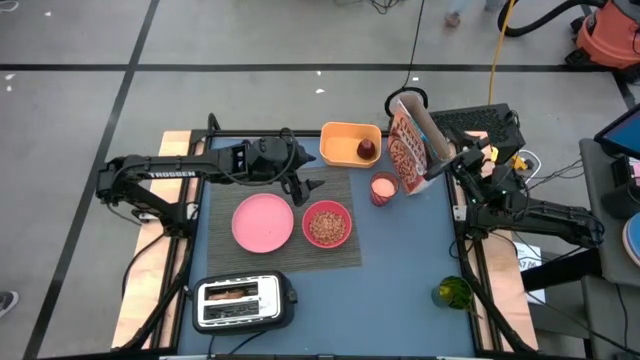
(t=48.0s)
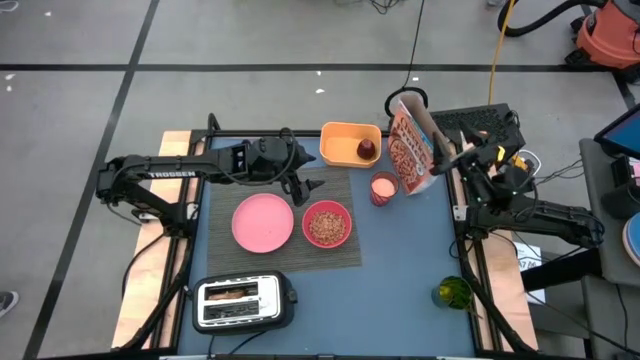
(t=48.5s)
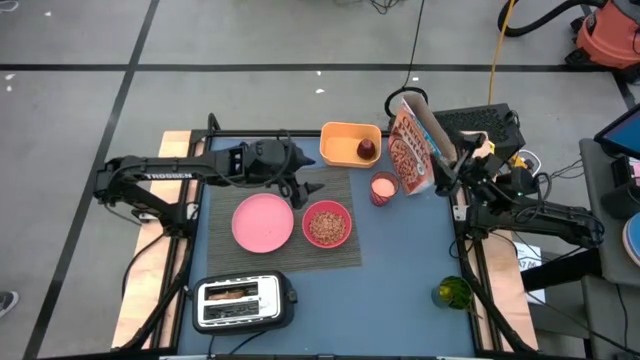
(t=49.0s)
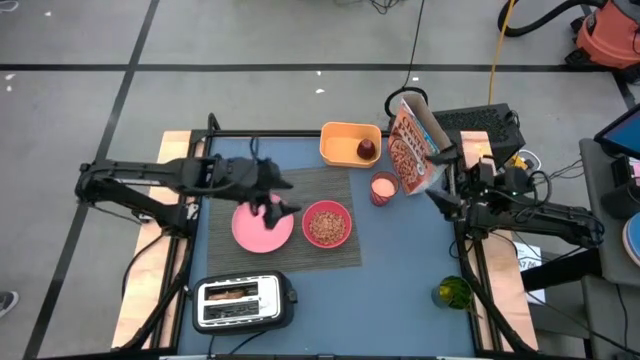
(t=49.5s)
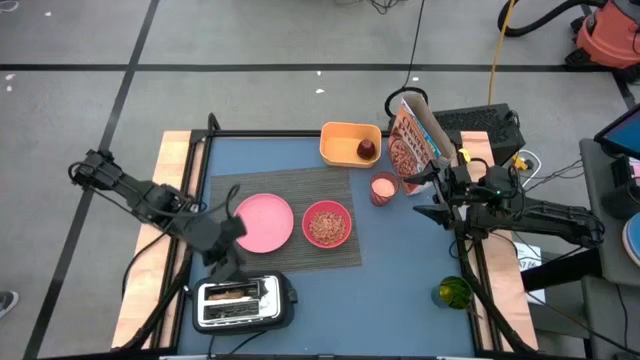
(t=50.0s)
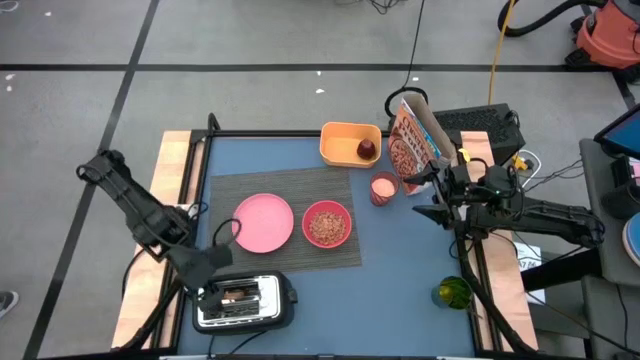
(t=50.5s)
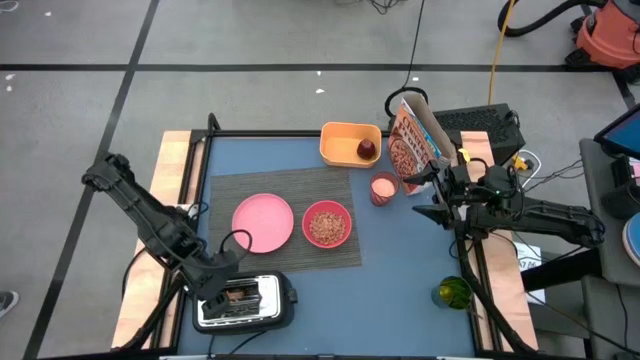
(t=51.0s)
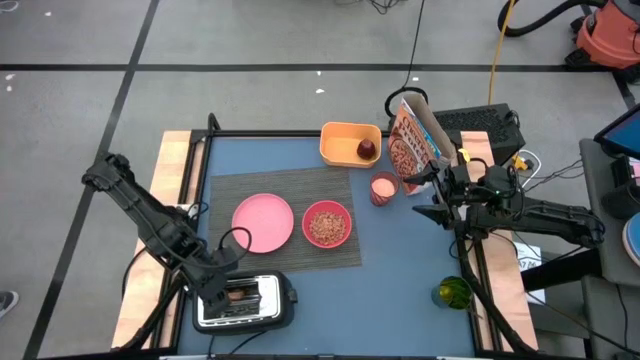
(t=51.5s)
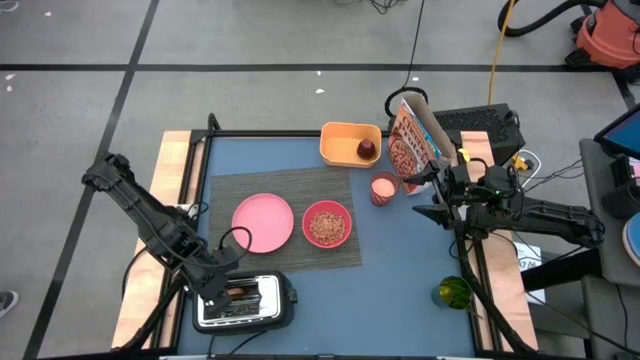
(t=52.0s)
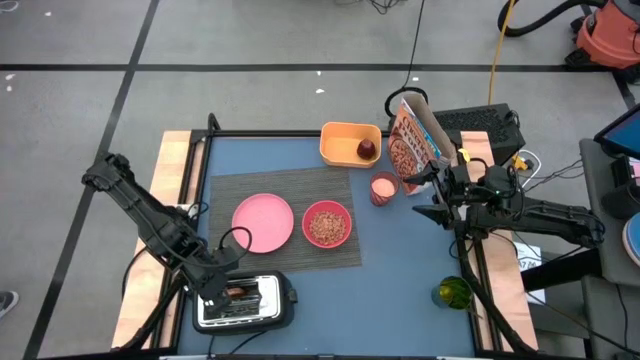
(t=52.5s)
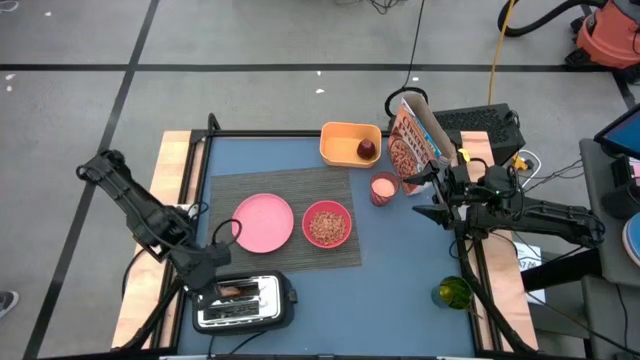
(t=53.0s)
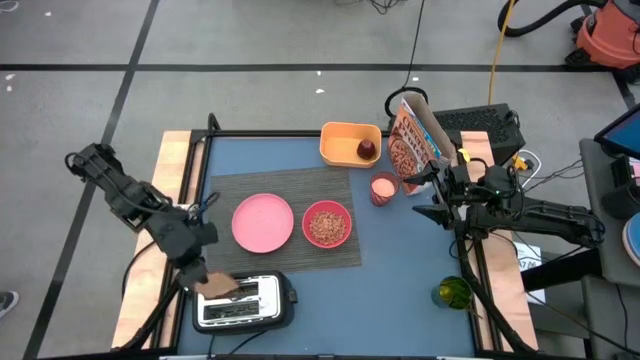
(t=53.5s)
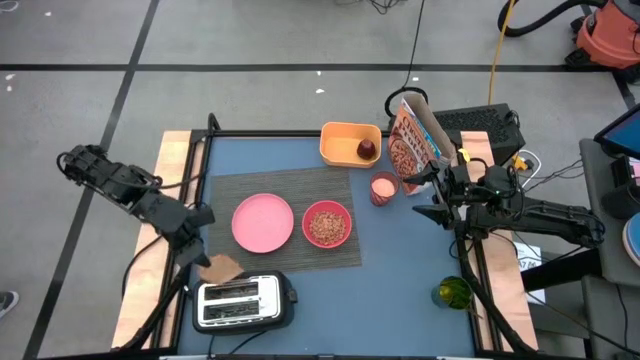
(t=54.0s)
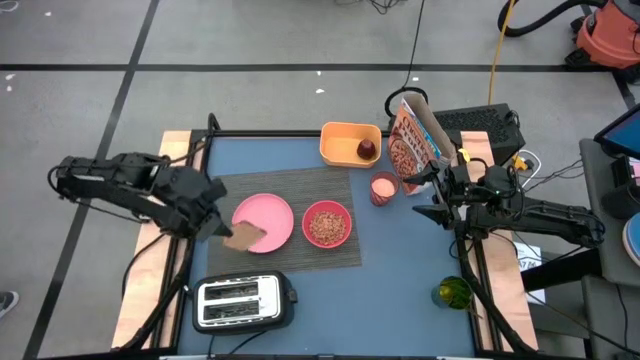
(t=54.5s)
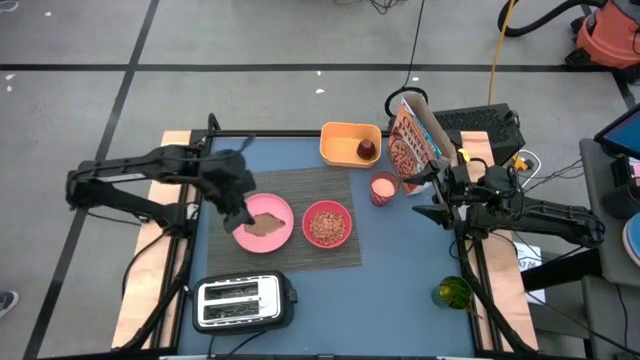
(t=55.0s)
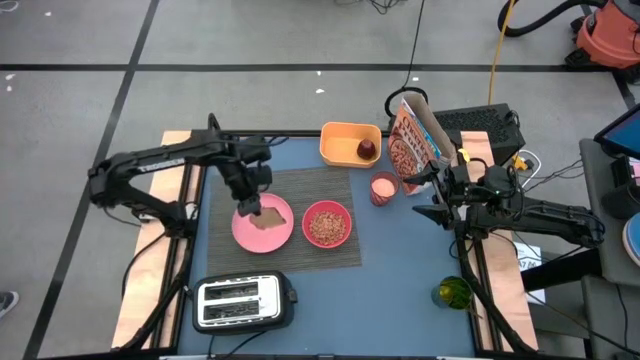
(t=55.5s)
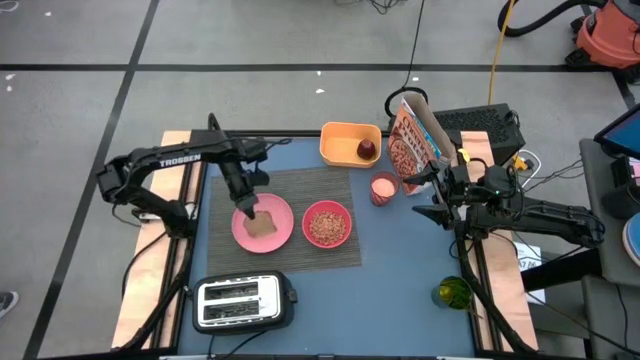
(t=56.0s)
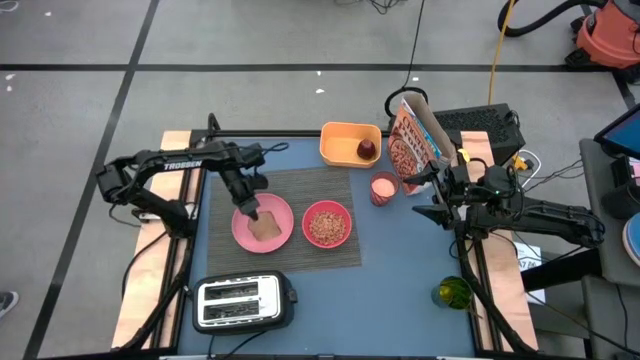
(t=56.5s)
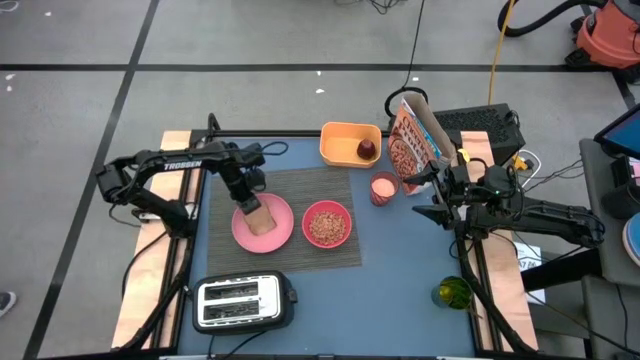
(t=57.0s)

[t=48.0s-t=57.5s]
Task: Arrange a breakfast setting
Put the bread on the pink plate

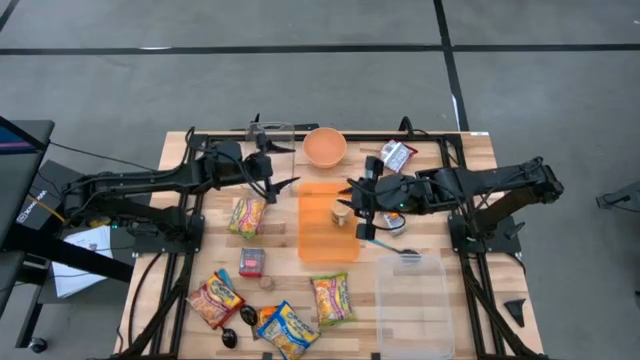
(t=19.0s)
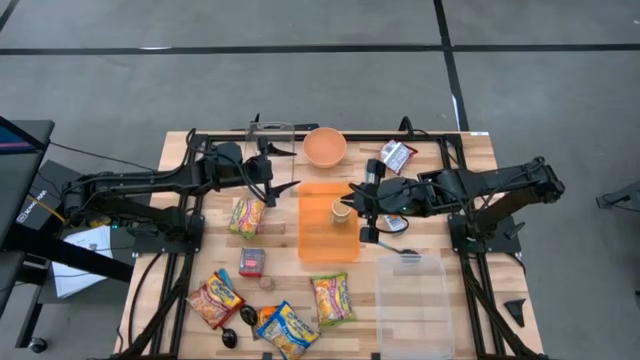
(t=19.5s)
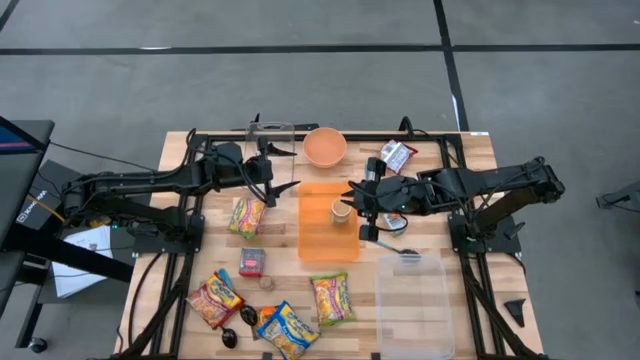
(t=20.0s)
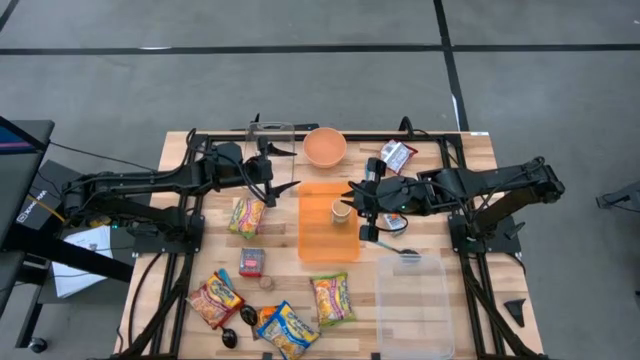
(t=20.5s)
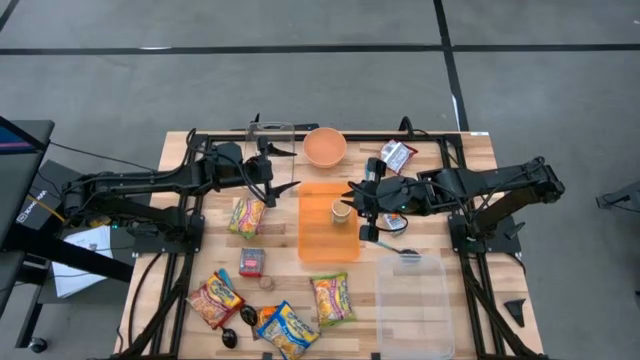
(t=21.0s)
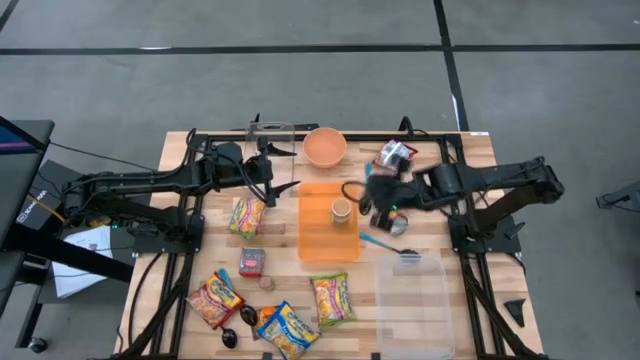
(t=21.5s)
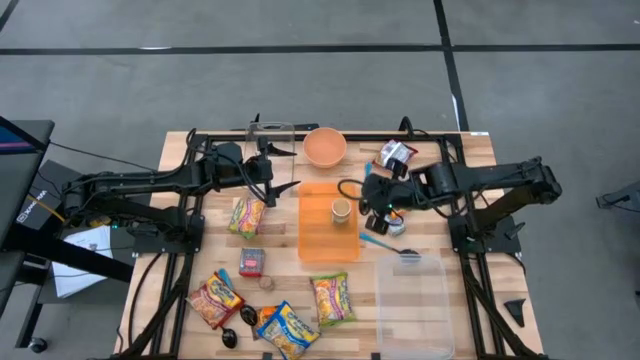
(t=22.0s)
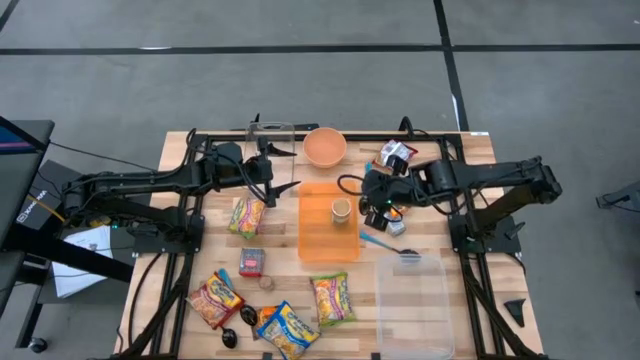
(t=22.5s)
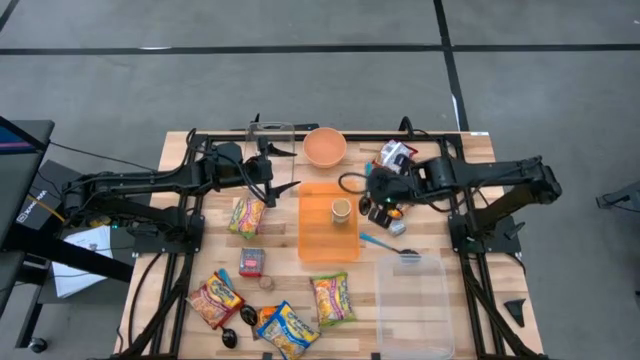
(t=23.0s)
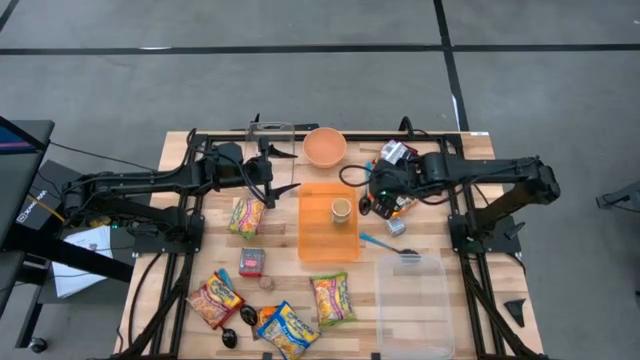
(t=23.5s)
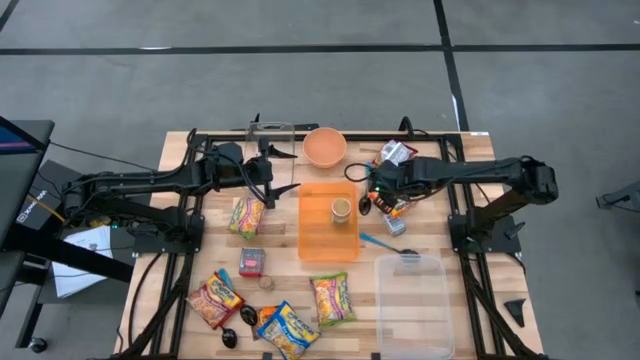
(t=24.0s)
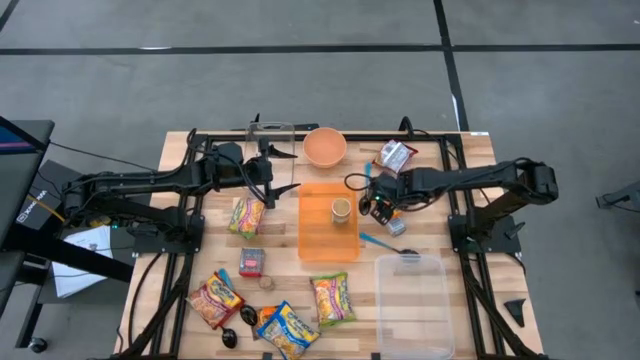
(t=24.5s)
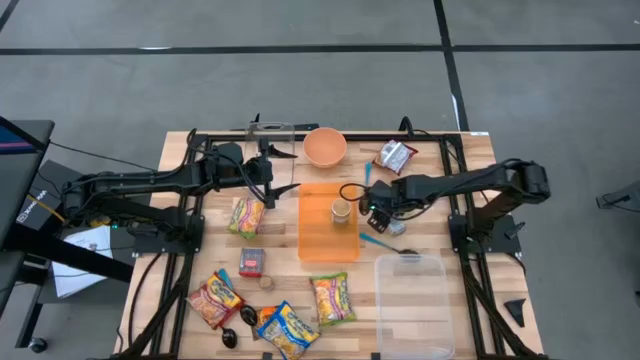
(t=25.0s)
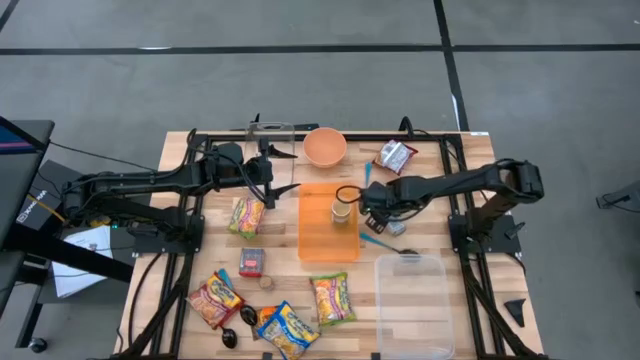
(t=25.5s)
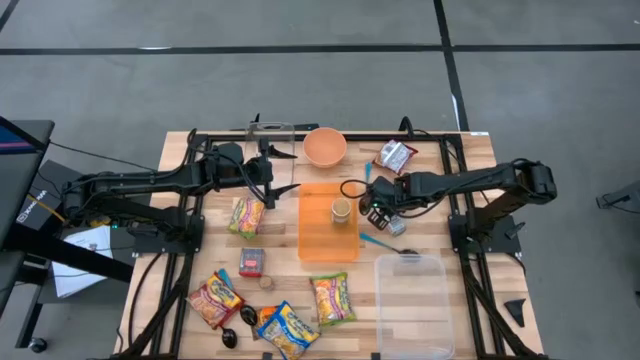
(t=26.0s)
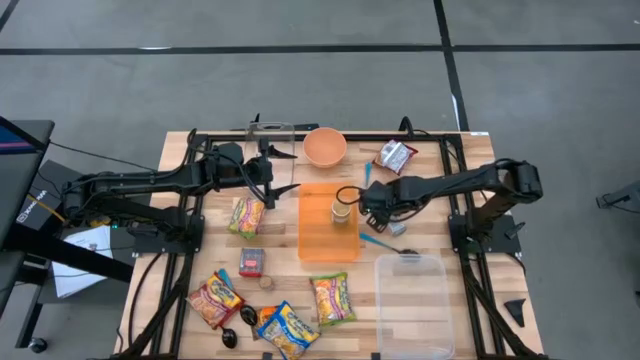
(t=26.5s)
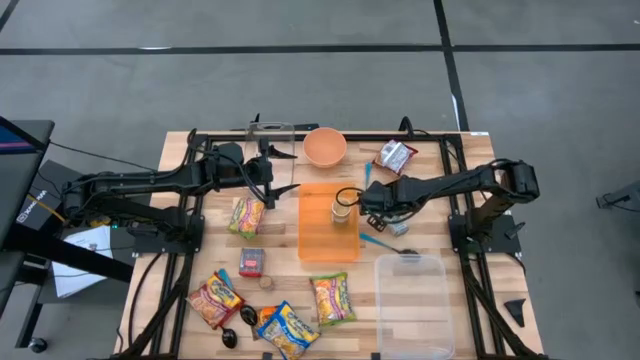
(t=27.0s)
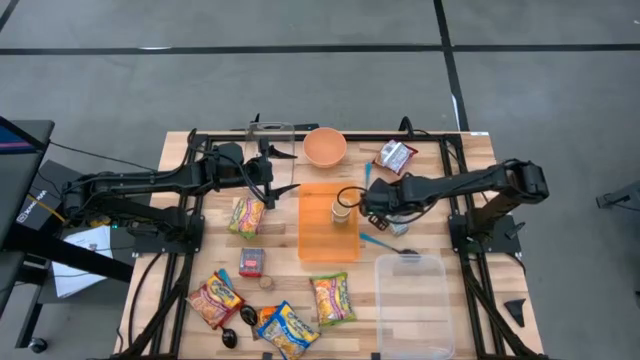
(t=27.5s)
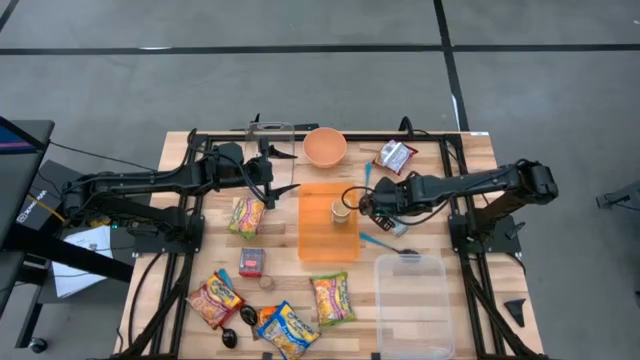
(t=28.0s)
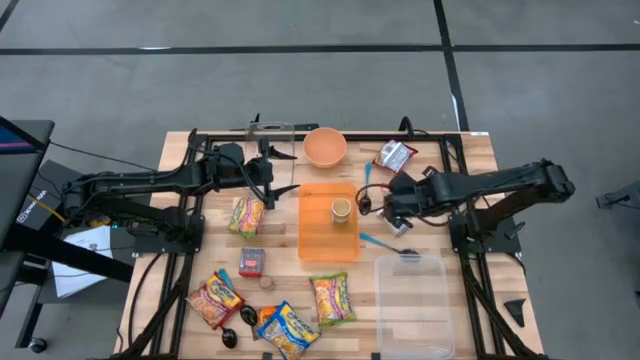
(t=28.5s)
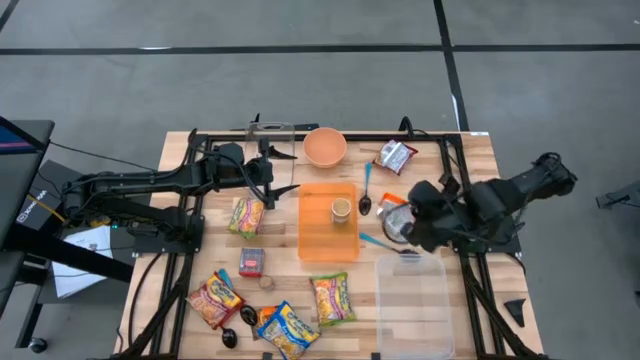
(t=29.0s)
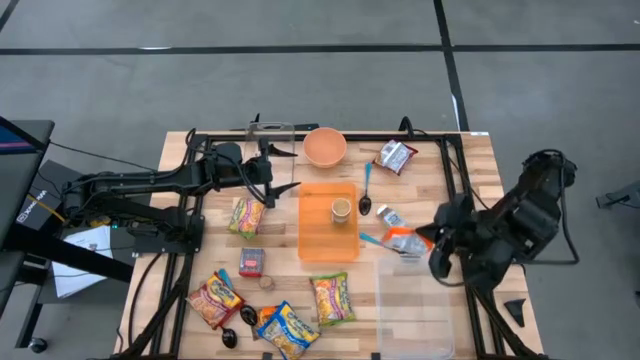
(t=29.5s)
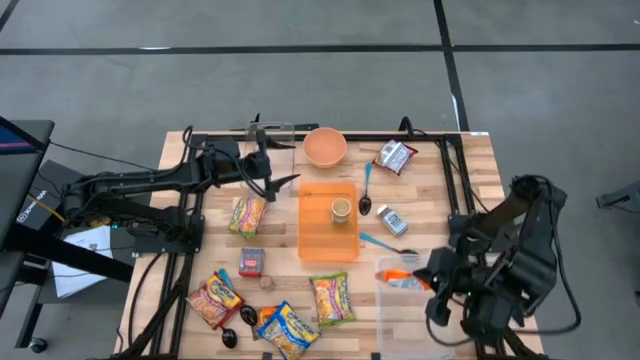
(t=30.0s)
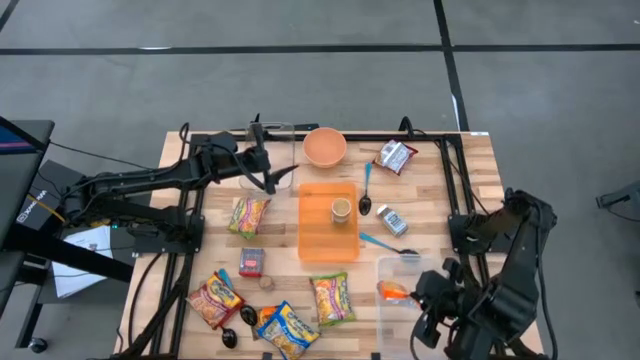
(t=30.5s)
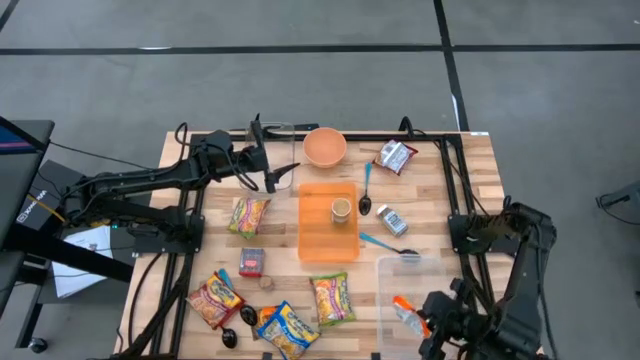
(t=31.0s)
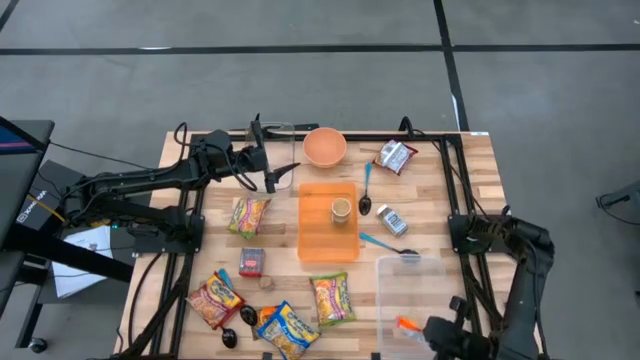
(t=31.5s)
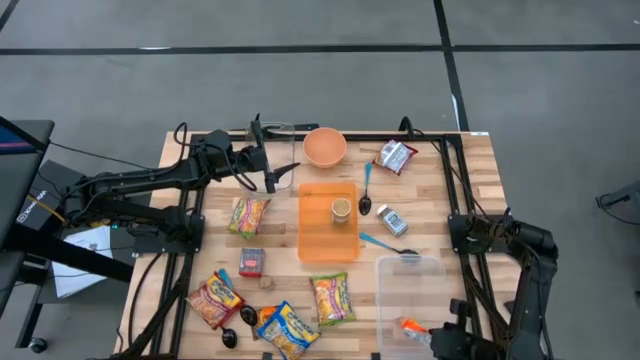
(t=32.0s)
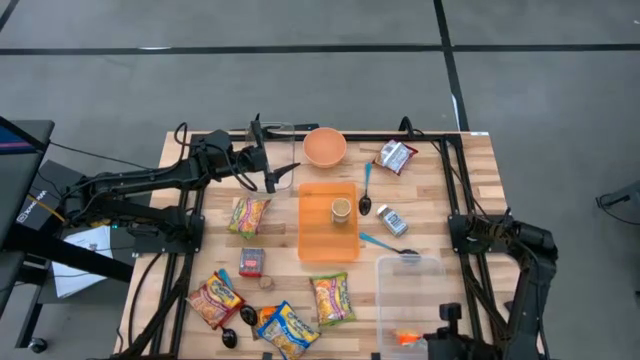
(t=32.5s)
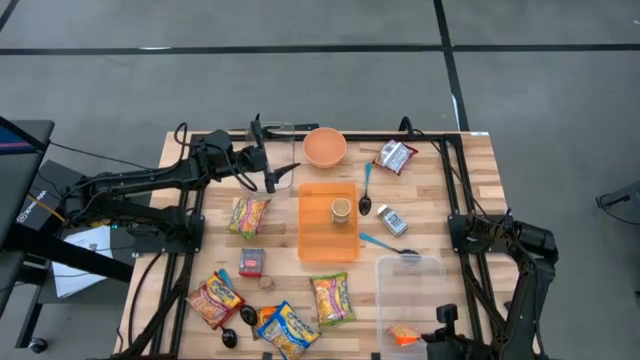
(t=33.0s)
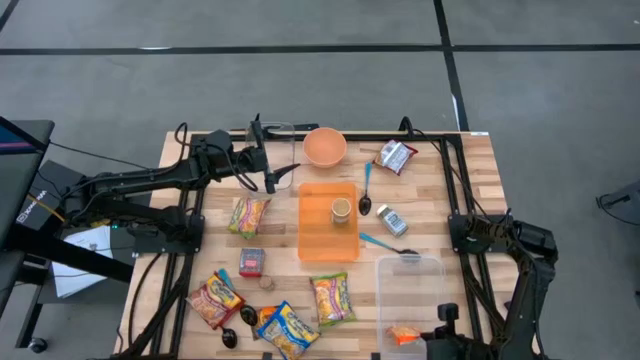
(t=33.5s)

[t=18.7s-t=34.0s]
Task: Pick & Place Food Item
Put the orange noodle pack into the transparent container
